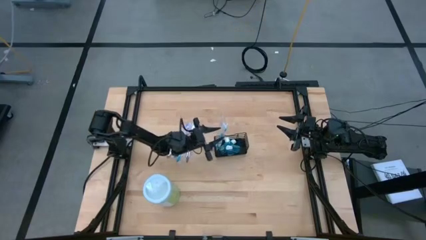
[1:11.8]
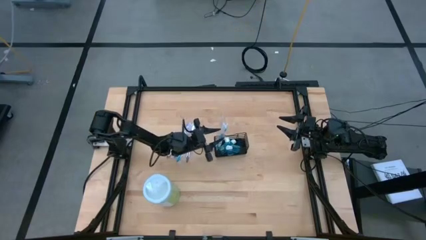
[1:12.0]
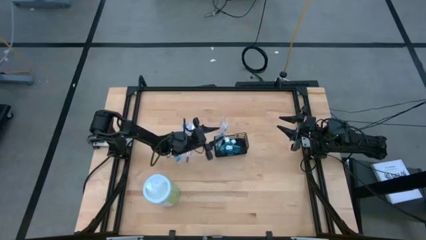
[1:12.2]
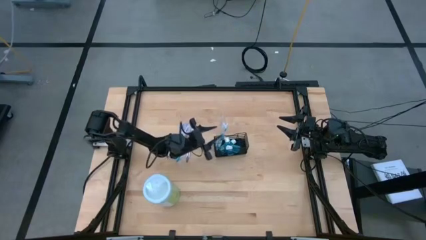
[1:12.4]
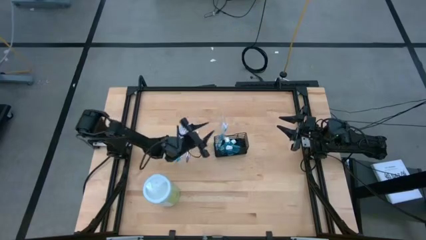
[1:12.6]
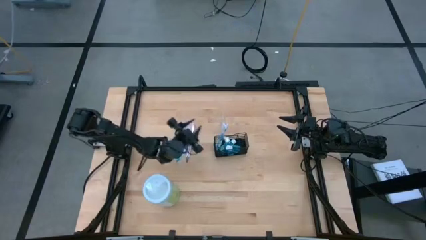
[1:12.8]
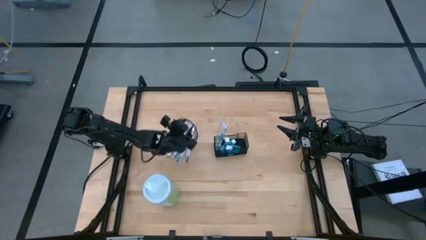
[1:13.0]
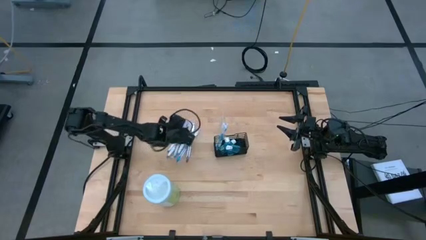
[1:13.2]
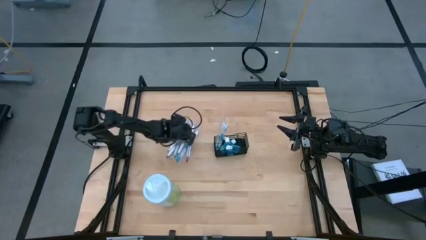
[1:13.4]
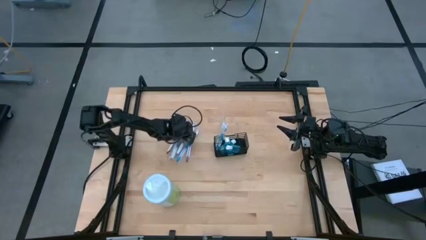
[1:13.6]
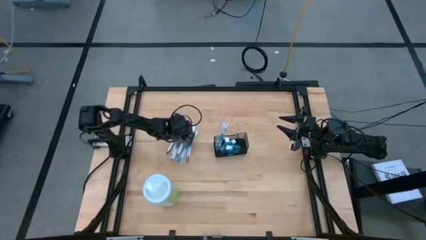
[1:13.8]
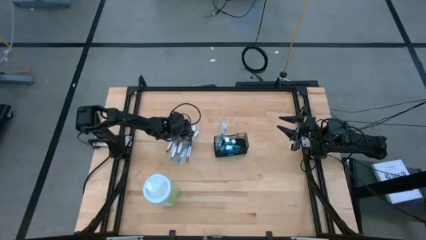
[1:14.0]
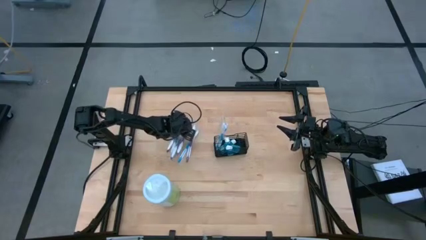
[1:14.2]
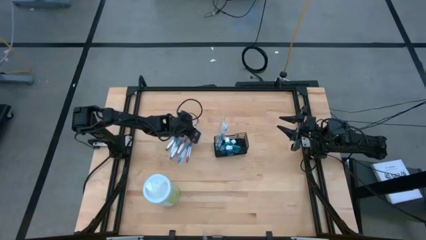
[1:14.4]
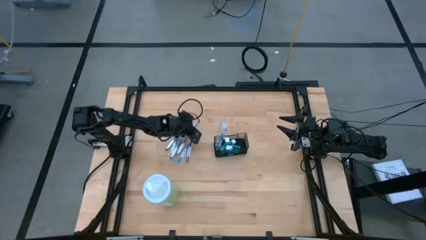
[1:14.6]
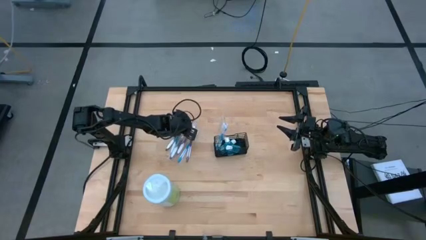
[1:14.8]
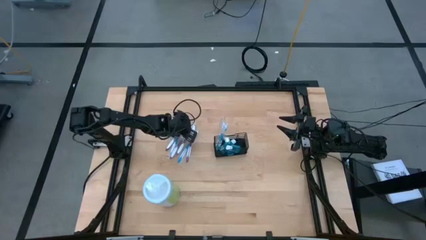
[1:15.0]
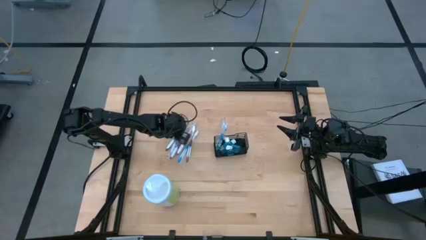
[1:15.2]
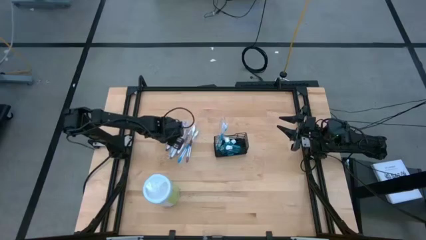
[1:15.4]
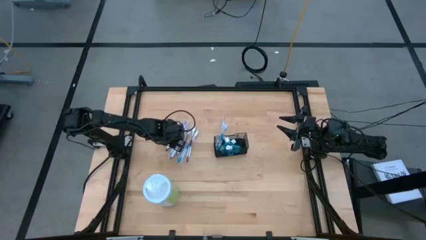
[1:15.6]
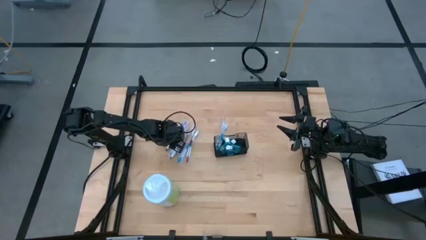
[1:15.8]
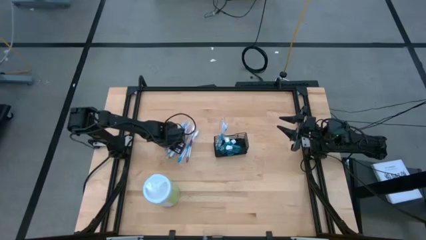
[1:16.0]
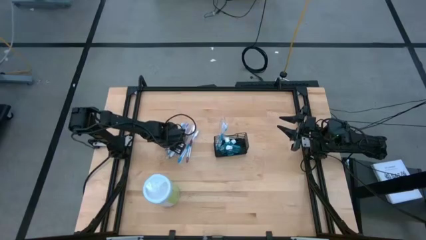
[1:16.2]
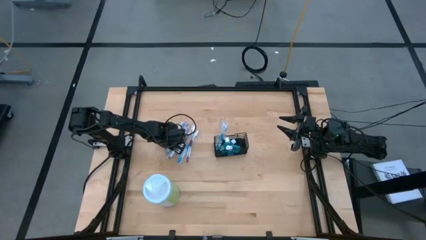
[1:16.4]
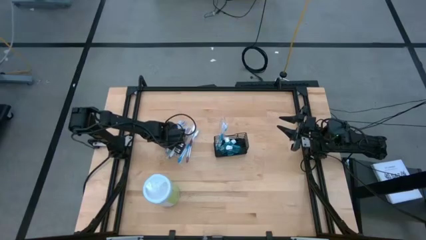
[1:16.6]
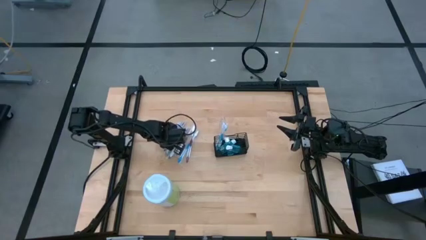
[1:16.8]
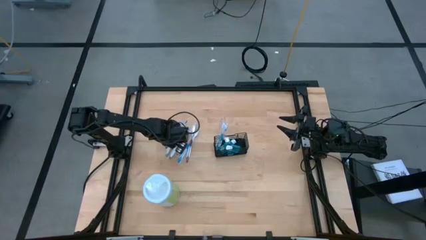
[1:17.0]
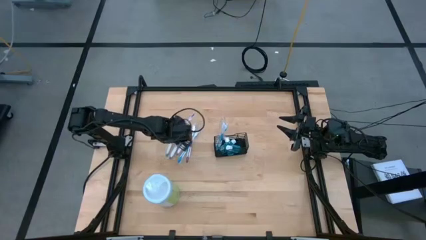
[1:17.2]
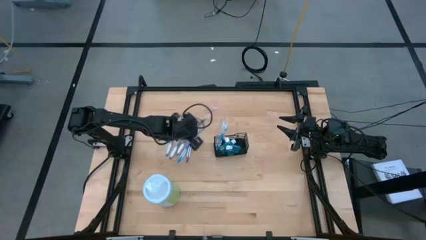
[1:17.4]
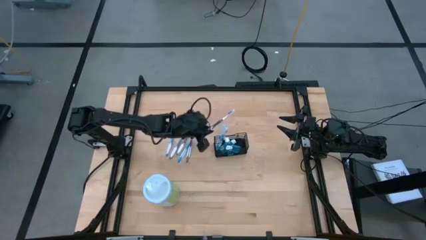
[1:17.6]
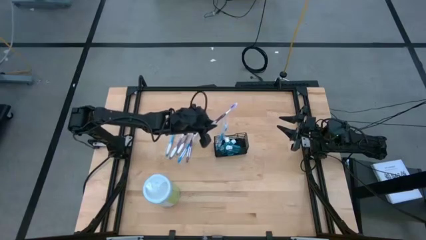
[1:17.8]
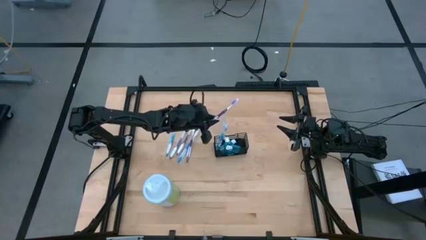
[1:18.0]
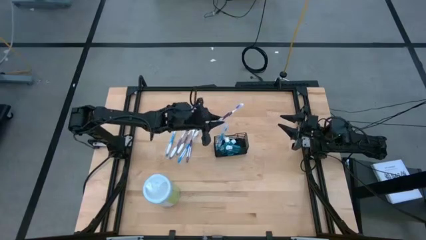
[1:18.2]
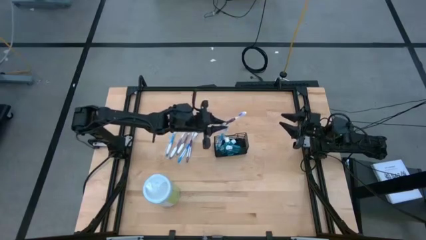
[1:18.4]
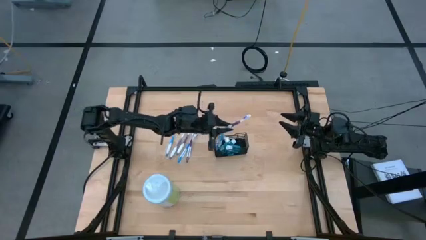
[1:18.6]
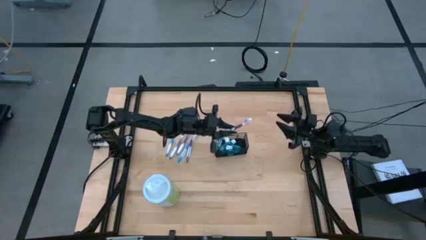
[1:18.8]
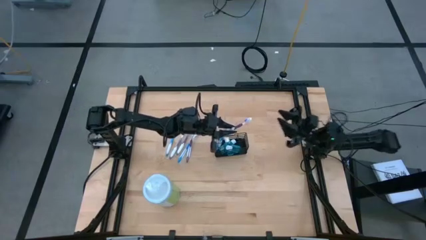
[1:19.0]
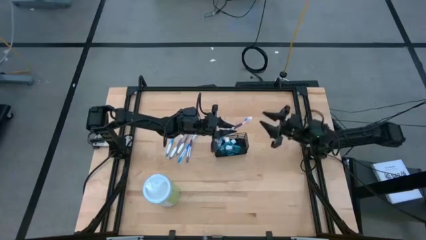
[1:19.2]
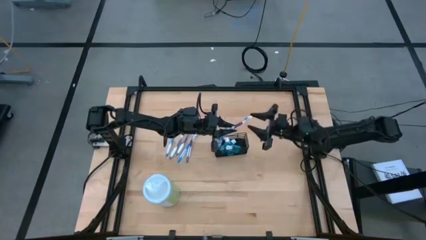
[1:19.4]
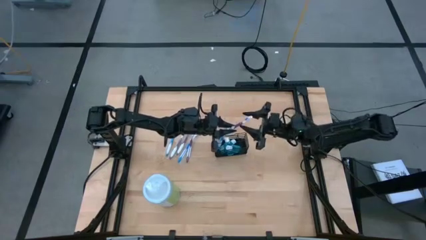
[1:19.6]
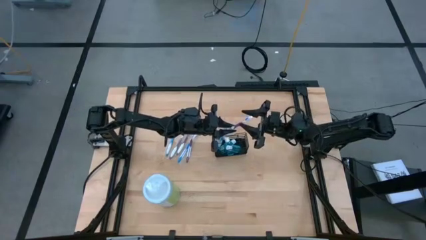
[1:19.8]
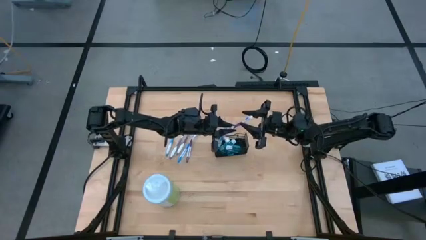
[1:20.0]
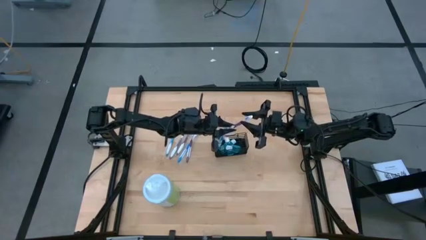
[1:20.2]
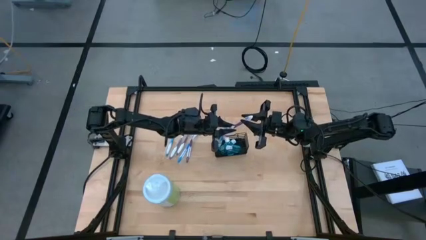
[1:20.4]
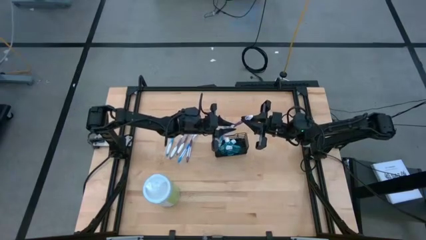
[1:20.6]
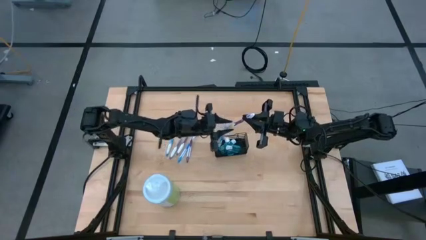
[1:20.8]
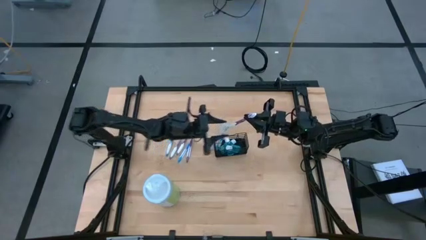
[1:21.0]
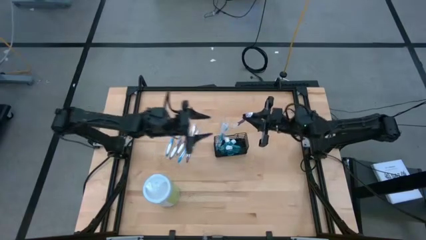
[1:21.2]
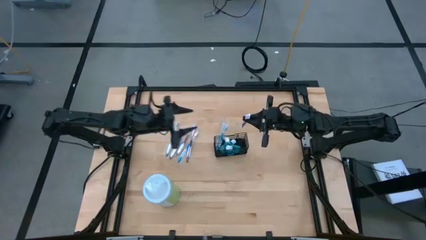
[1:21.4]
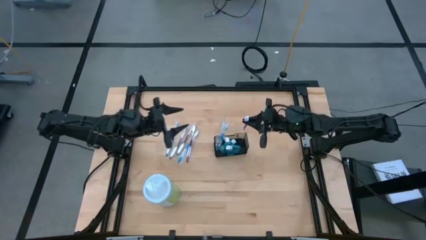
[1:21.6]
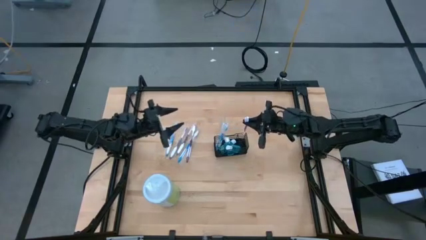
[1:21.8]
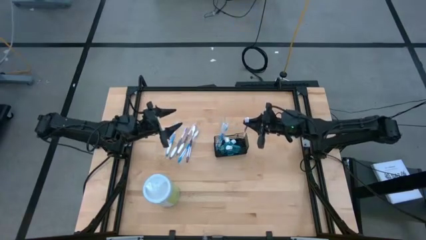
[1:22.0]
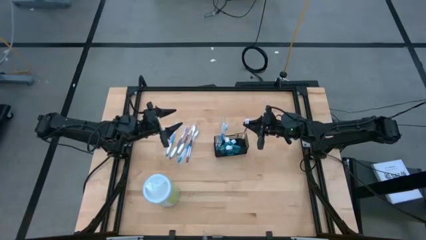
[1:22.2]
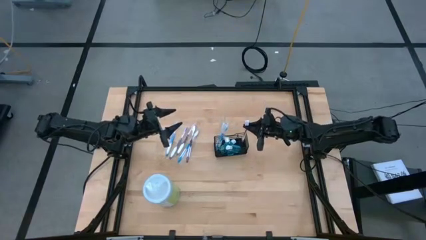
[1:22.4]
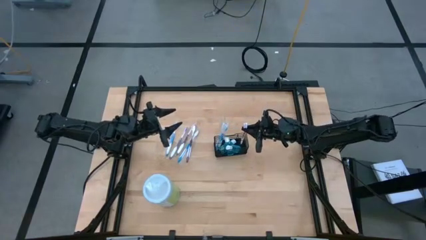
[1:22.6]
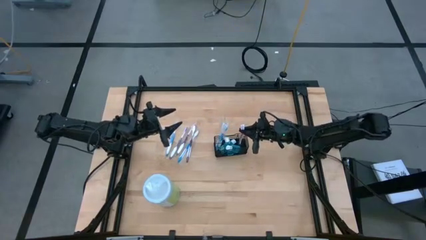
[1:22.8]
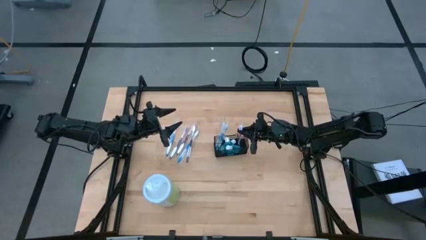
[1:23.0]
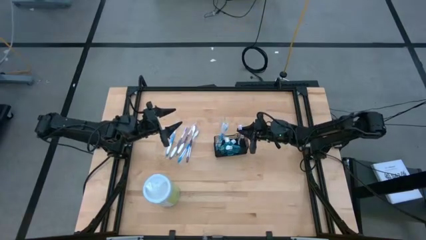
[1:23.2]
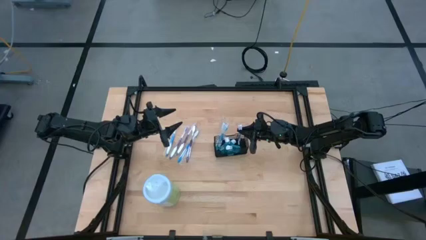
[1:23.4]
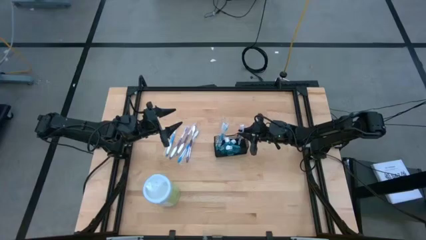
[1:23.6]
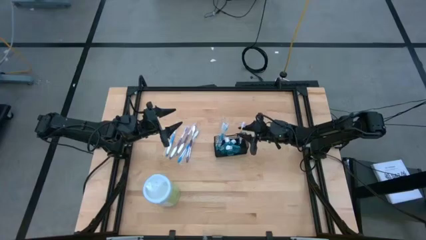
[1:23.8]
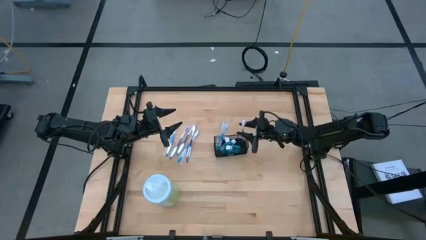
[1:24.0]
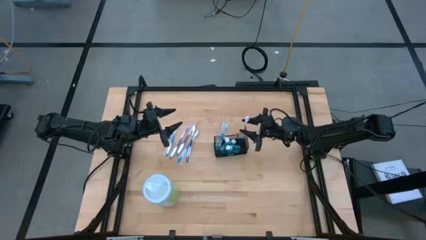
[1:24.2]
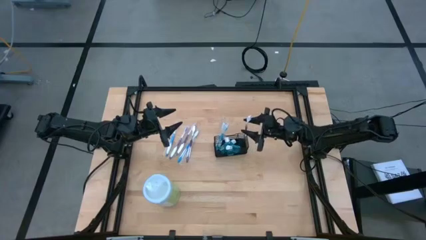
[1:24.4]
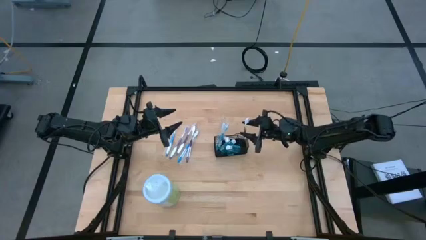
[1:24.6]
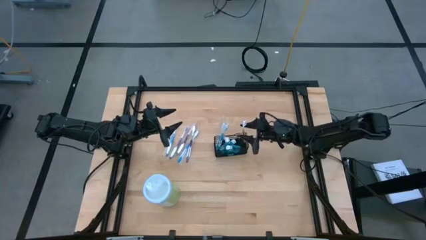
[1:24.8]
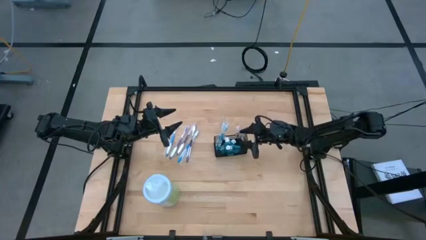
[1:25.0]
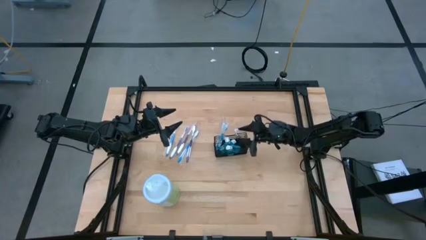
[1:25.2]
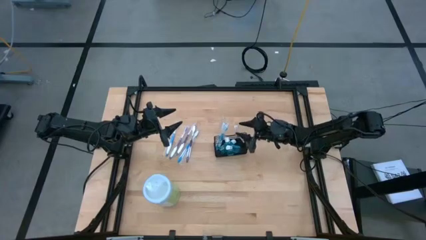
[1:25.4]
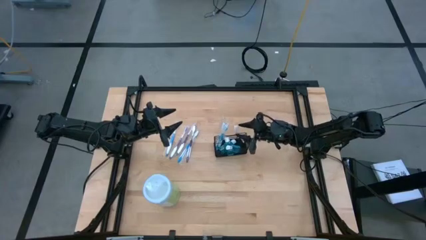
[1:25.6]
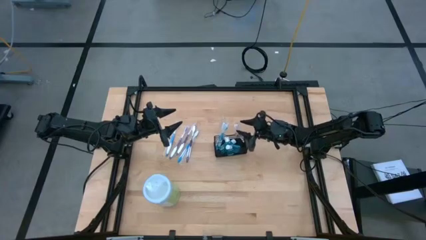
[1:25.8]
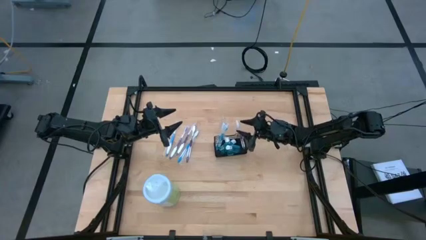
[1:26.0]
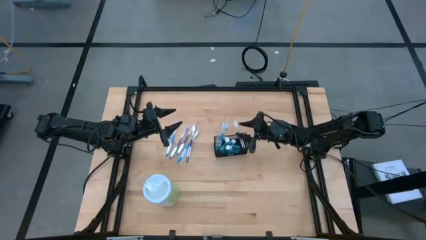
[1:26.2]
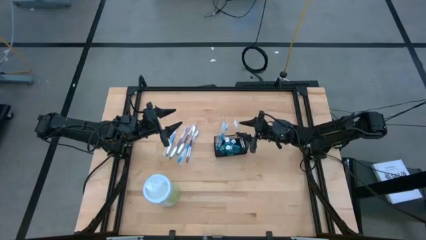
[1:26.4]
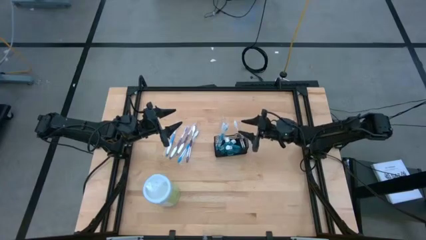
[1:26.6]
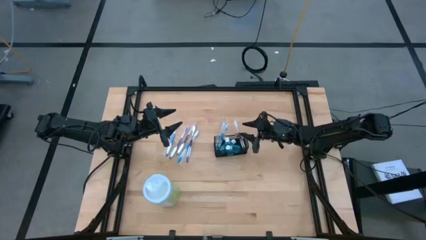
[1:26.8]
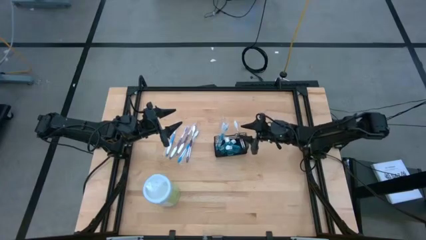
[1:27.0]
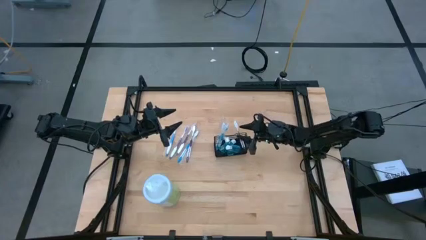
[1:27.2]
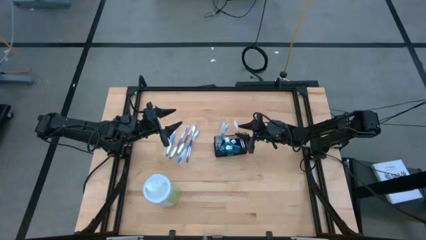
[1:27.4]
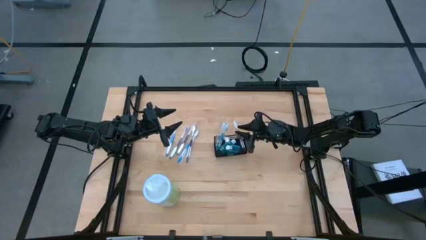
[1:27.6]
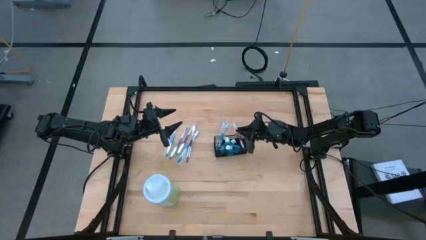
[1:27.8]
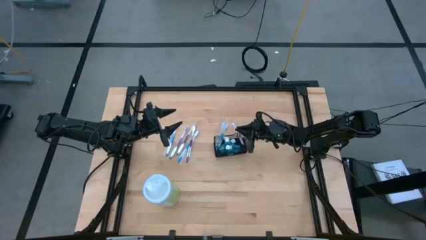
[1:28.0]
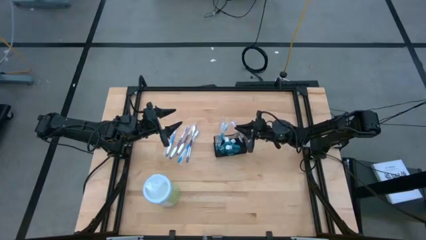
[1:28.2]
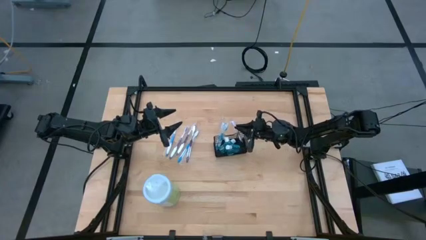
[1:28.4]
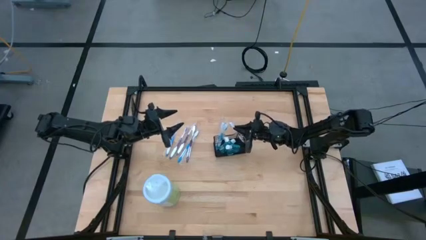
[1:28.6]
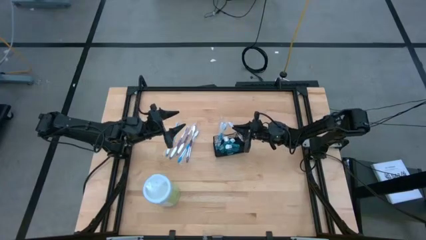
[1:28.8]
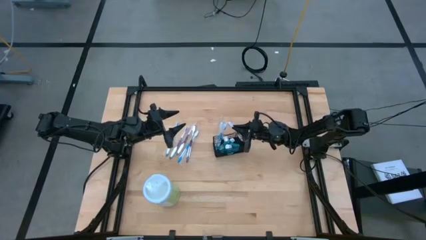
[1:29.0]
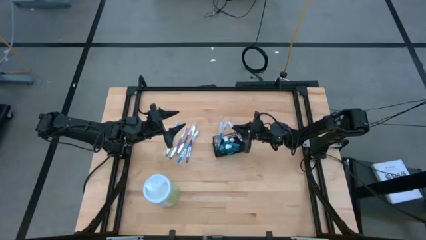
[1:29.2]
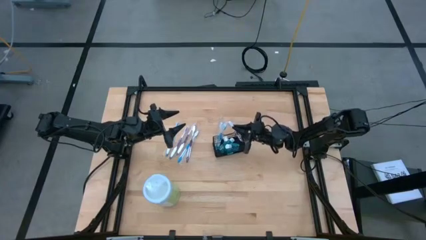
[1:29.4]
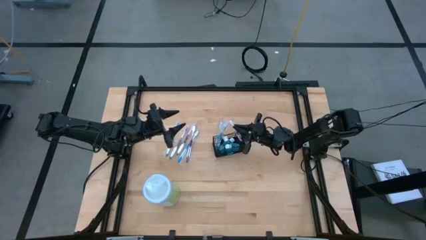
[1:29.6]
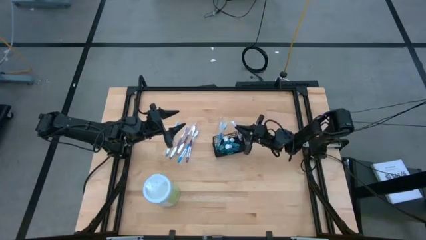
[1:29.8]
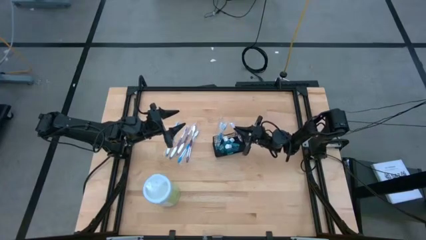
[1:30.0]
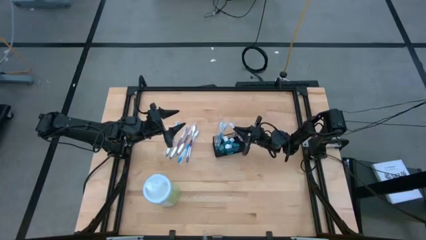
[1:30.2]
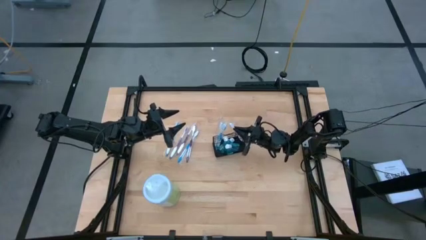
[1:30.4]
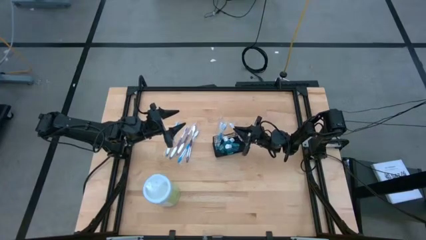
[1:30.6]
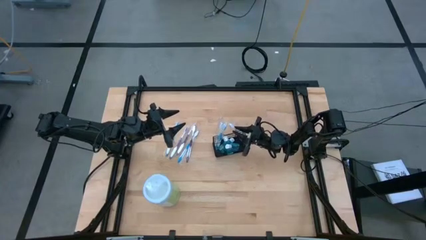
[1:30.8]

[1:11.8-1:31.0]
Task: Pick & Place toothbrushing station
Put the purple toothbrush into the black mesh organizer
